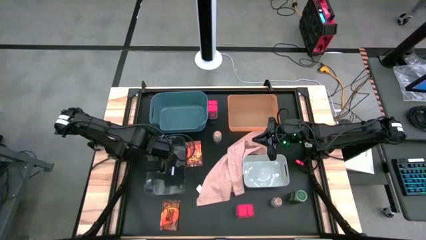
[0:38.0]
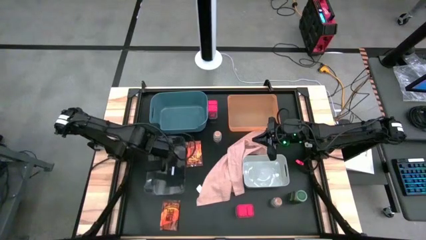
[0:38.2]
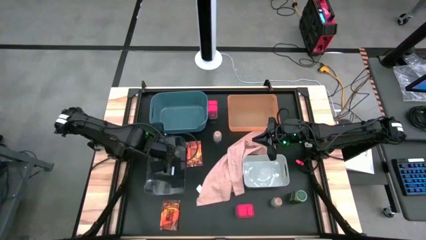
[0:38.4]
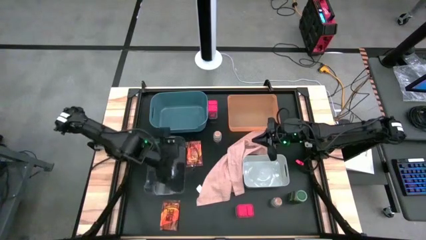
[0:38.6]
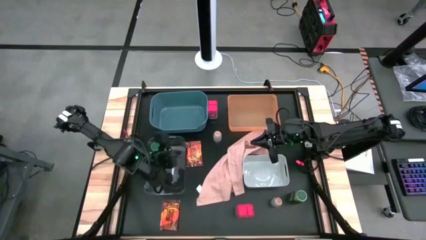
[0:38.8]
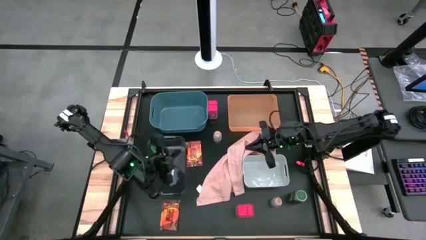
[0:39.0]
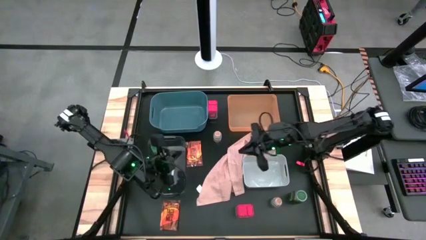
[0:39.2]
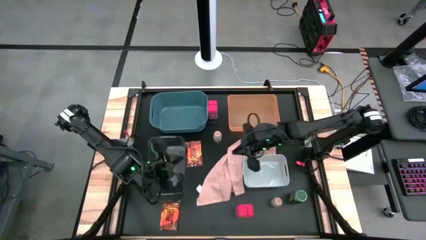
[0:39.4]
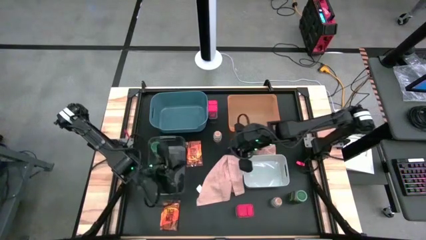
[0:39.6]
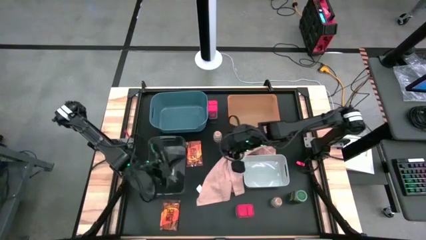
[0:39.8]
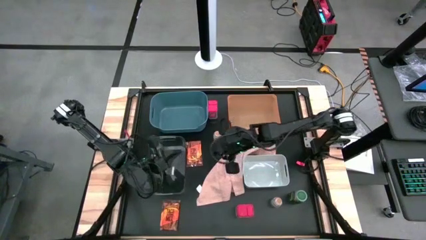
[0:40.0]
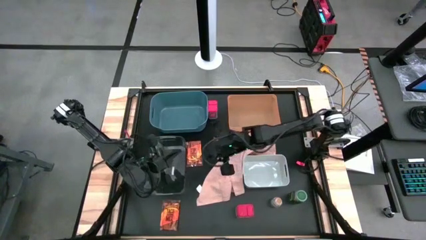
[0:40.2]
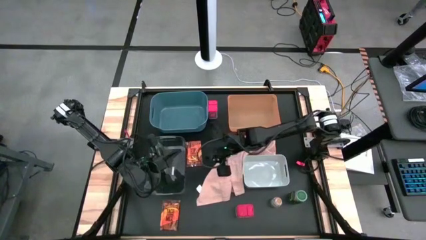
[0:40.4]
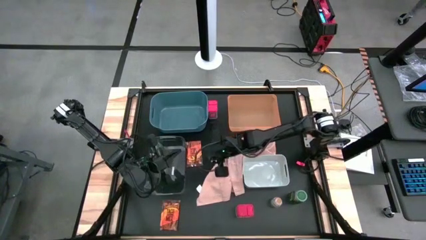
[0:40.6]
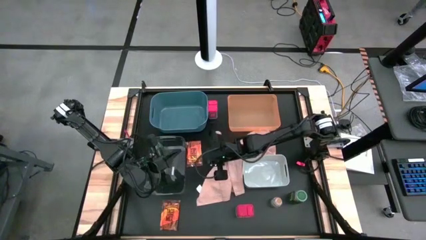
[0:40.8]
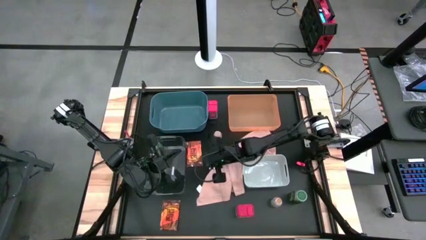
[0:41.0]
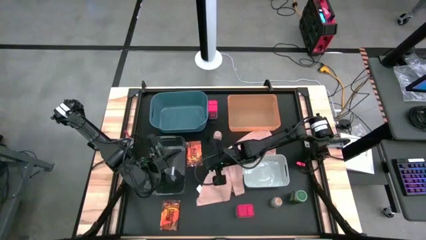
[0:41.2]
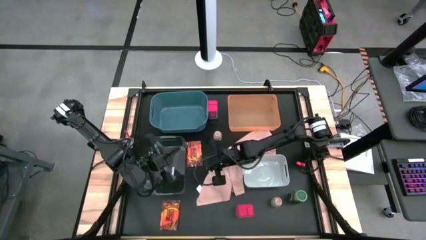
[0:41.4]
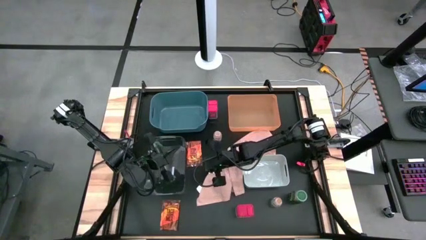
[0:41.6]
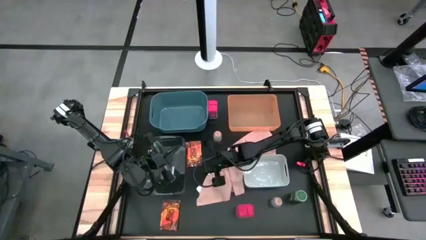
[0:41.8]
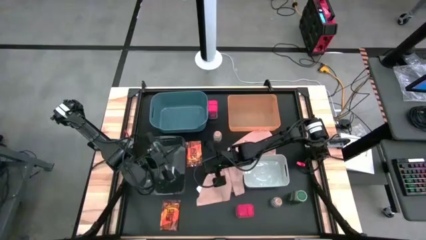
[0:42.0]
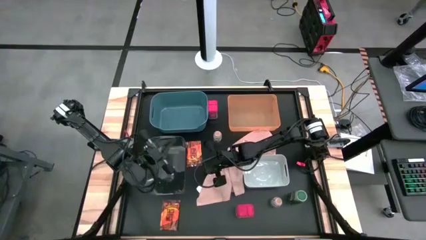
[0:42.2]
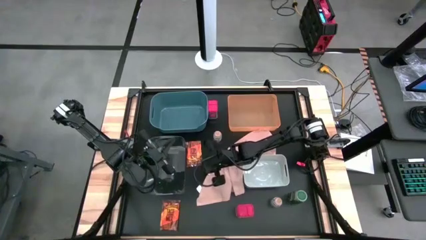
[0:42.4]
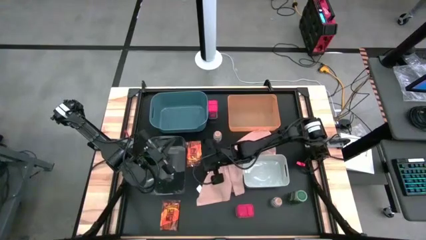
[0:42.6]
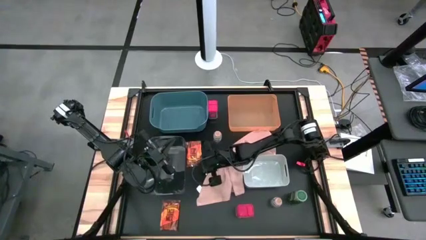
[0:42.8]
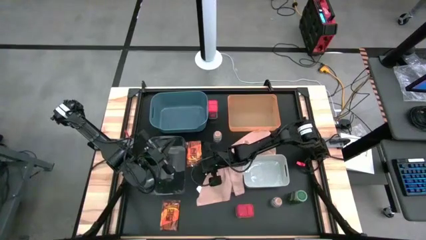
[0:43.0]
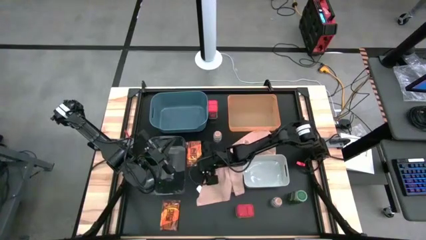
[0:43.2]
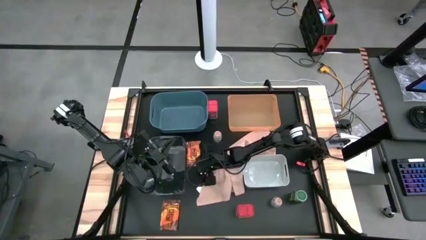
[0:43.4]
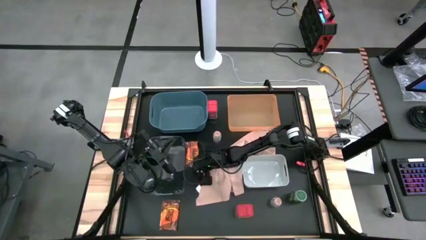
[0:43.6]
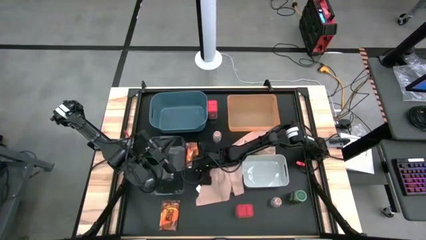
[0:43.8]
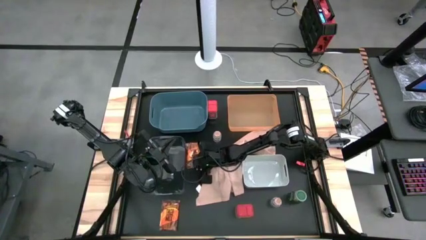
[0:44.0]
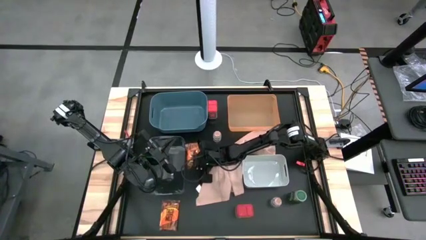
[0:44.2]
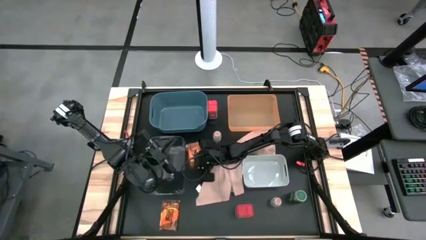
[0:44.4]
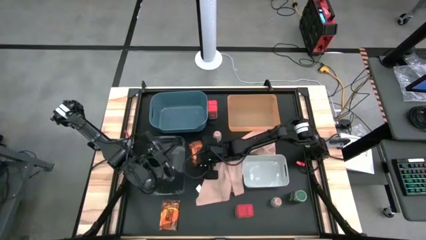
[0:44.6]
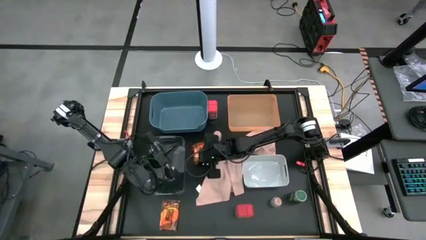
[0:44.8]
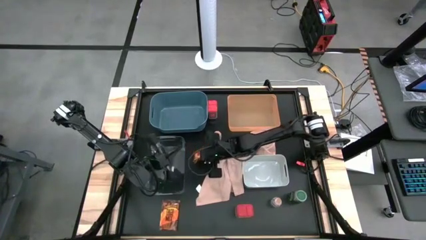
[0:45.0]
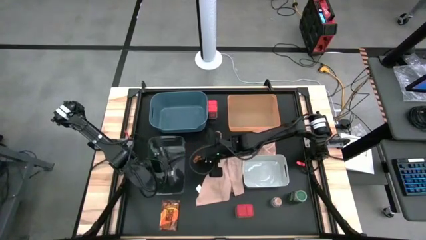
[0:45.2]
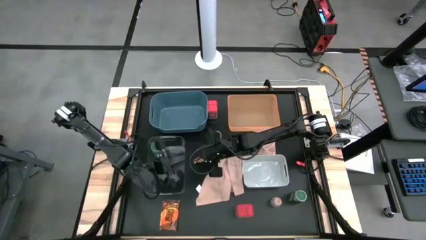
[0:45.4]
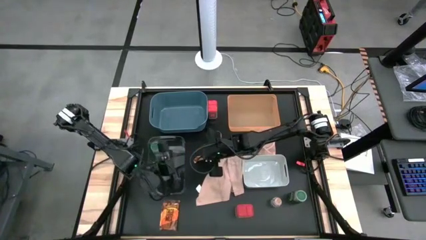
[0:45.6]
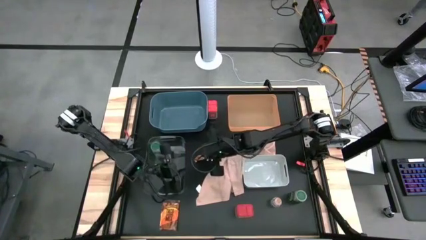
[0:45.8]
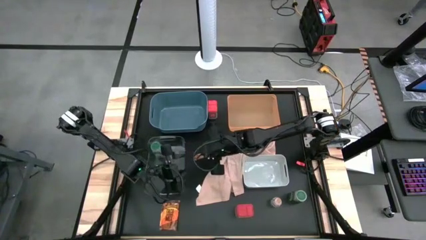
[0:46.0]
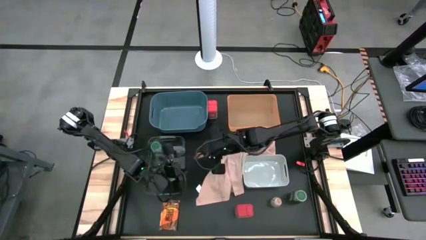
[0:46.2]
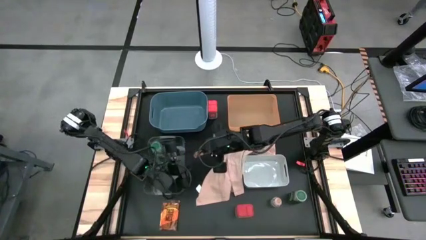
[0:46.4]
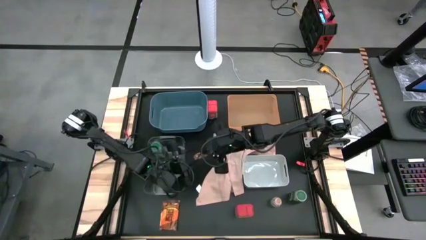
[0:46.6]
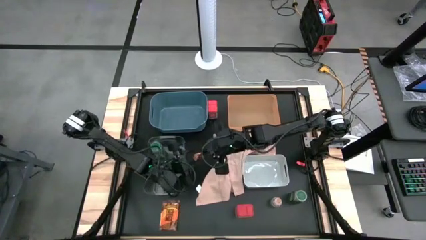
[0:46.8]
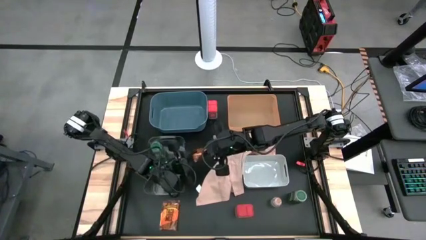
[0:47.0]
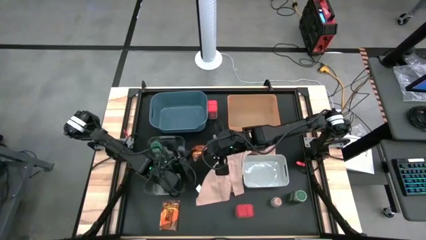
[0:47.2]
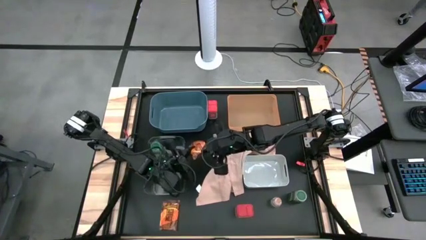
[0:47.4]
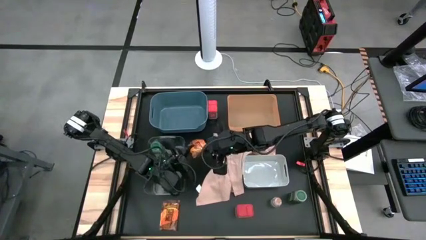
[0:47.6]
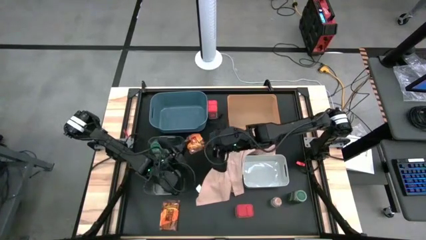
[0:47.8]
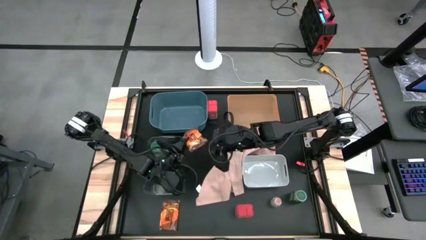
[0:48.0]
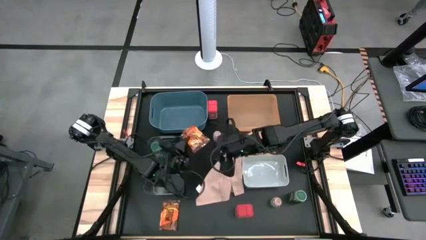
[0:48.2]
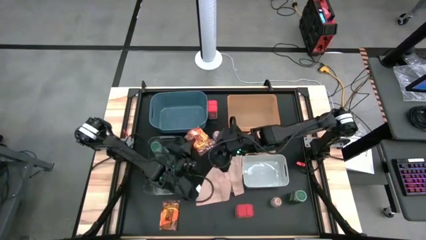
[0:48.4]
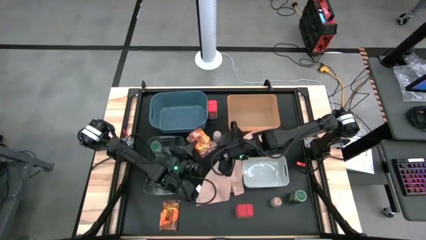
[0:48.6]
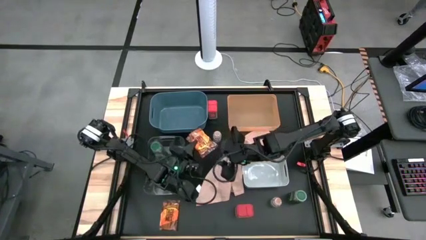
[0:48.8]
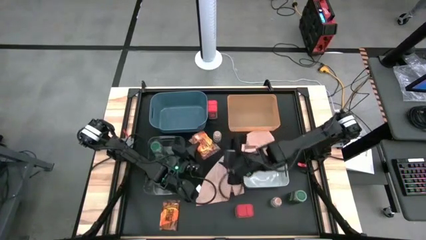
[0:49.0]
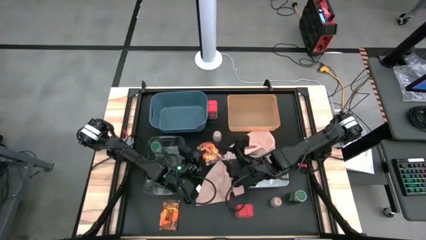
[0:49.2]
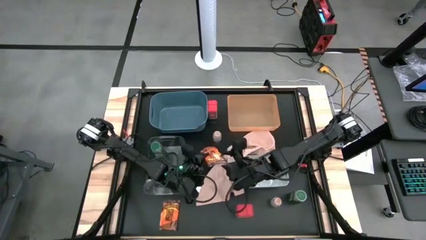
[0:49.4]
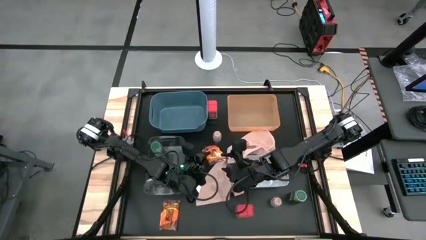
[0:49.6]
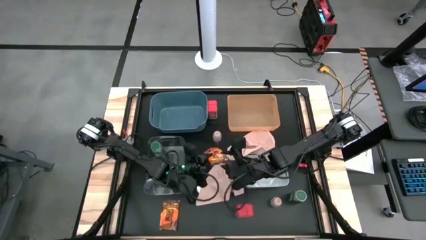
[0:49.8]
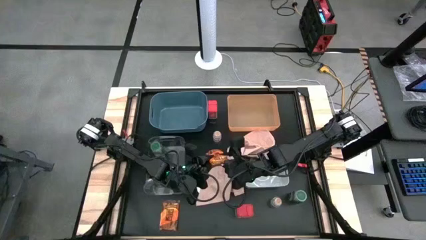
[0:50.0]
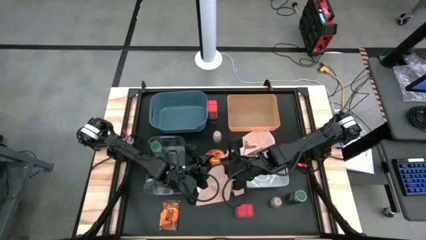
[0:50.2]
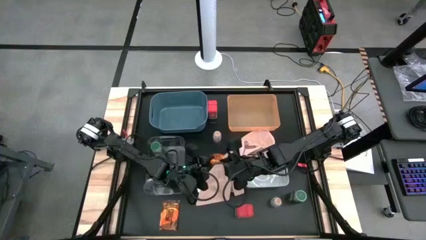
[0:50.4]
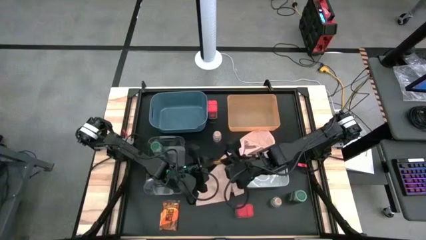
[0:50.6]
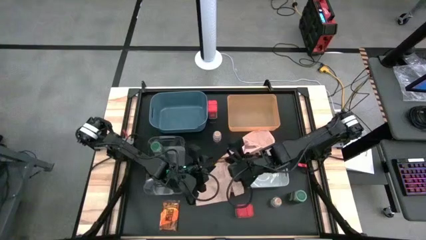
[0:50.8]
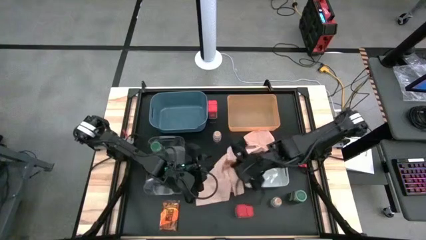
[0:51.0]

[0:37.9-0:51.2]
Task: Sort spices by type
Put the top orange seasoning bag into the orange bin

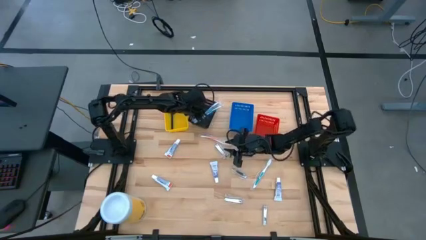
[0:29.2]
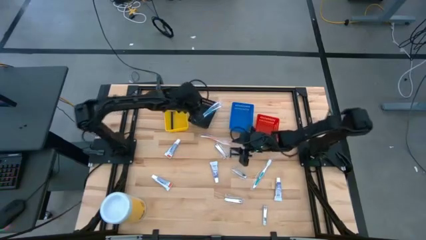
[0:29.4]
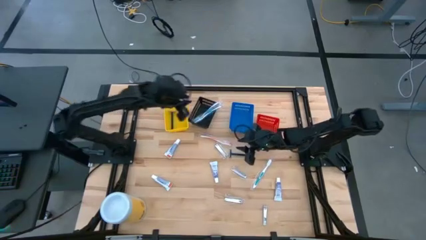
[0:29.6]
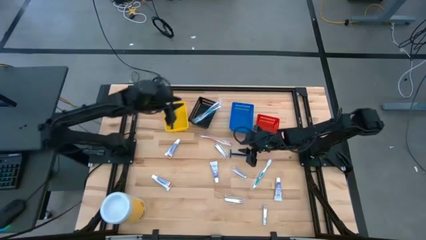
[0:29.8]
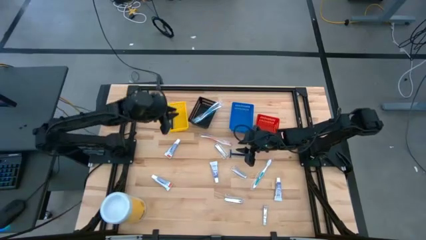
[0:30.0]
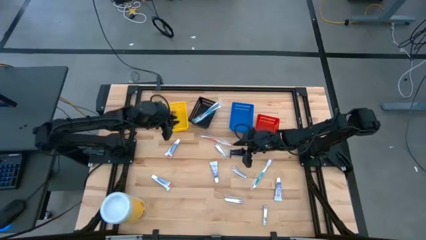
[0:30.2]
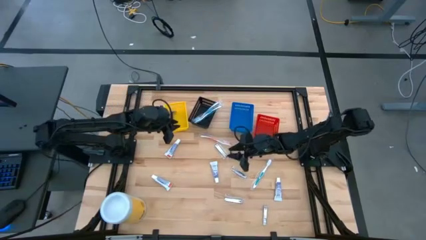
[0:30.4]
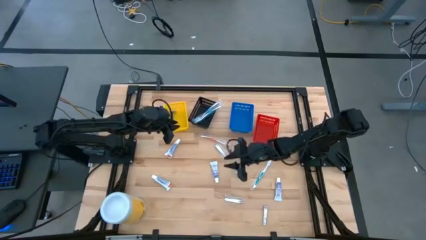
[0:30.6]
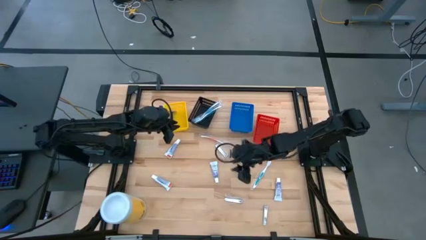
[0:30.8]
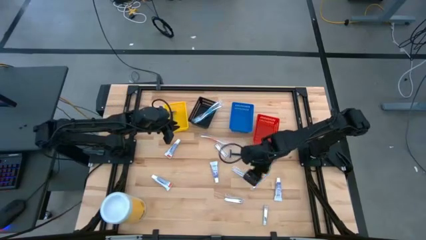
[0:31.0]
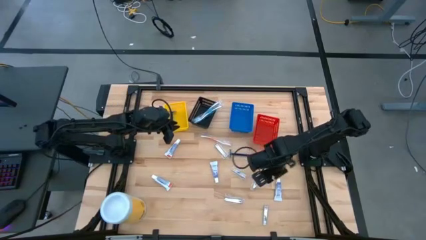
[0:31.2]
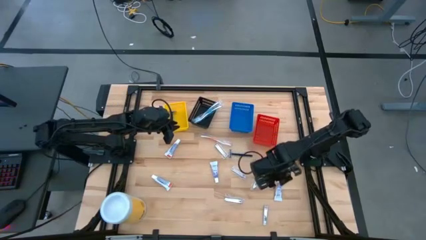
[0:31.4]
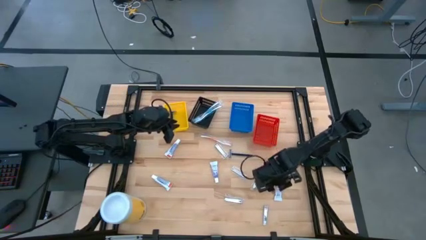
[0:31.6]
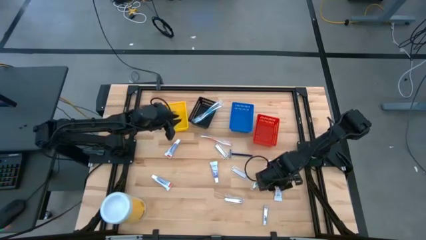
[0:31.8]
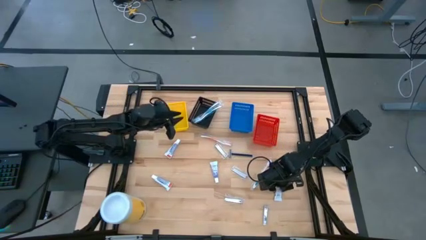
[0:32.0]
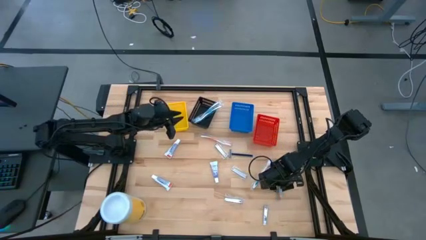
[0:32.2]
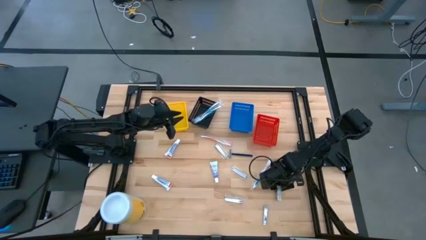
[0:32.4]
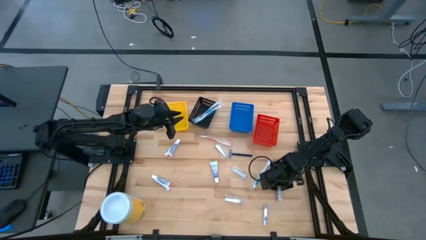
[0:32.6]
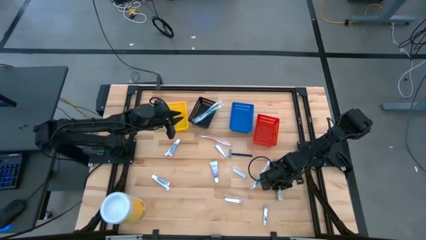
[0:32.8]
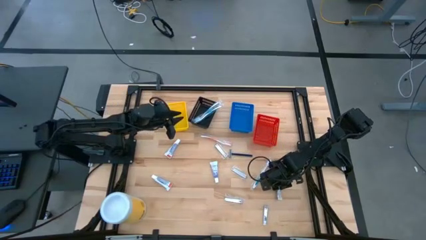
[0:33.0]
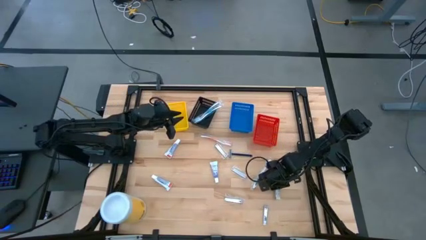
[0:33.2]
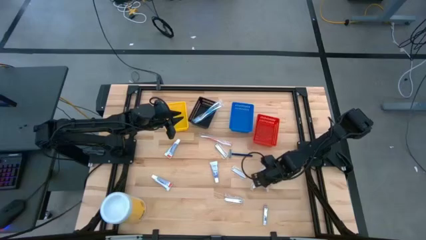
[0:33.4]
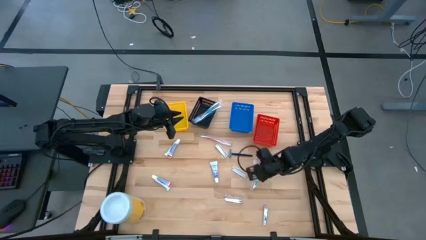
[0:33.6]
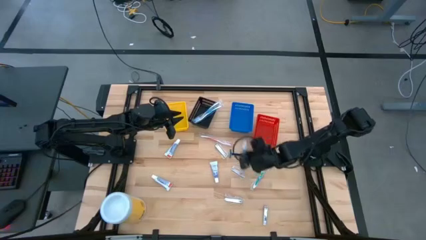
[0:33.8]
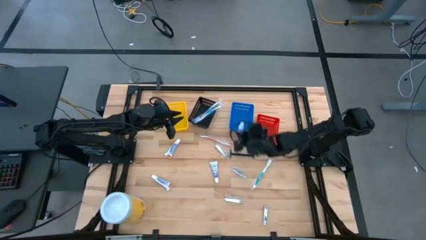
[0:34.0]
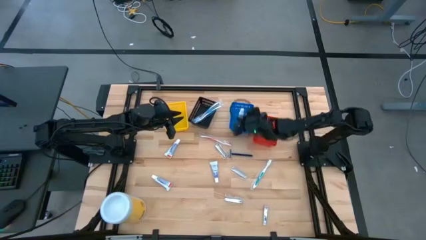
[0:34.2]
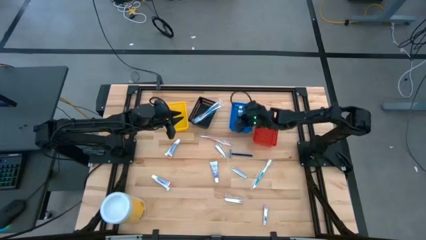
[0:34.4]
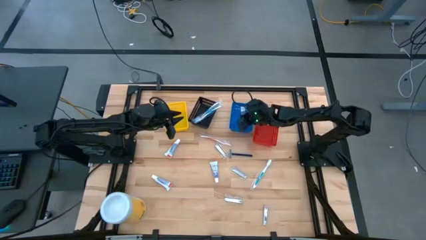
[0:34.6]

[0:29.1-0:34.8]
Task: Pick & Place Travel size toiletries
Put the blue toothpaste into the blue bin
